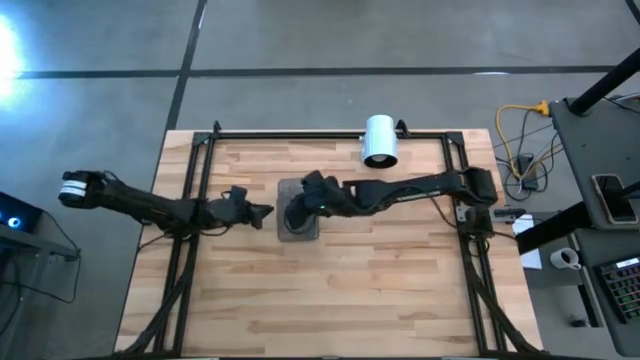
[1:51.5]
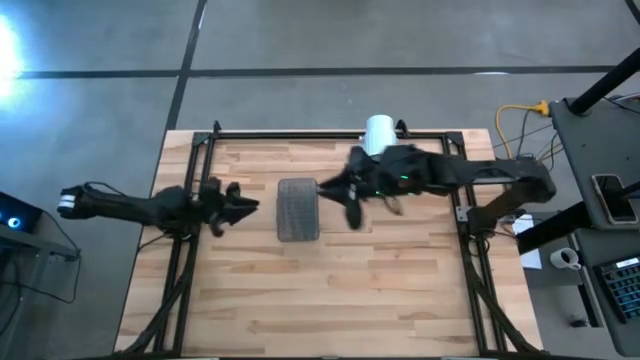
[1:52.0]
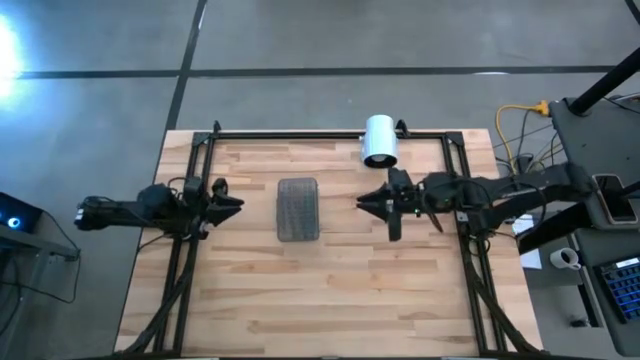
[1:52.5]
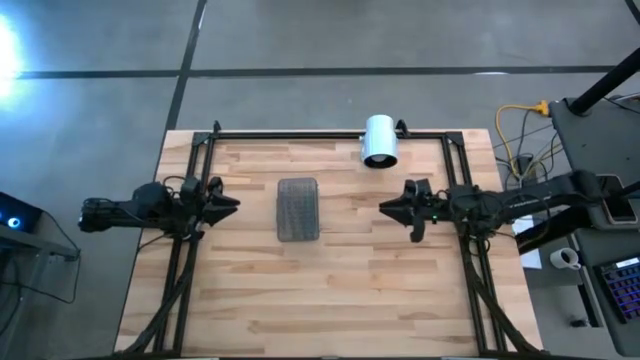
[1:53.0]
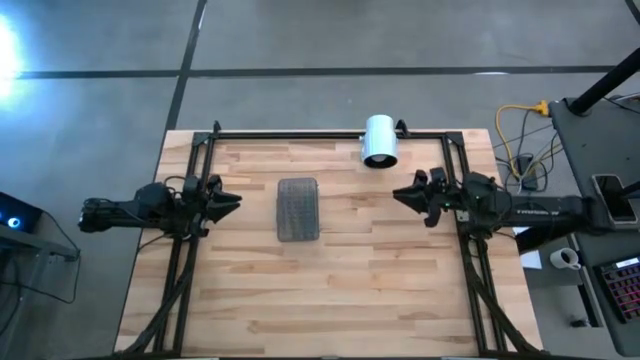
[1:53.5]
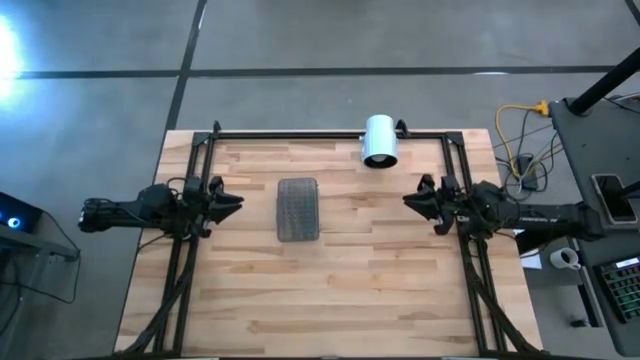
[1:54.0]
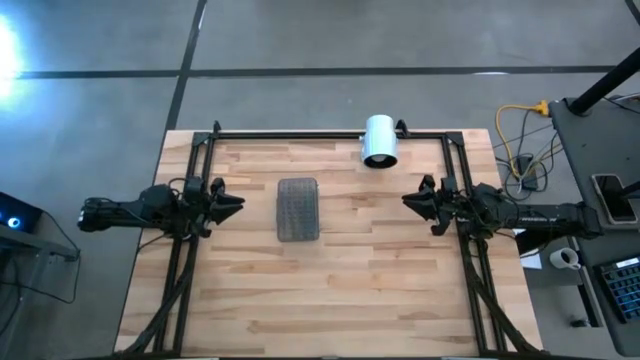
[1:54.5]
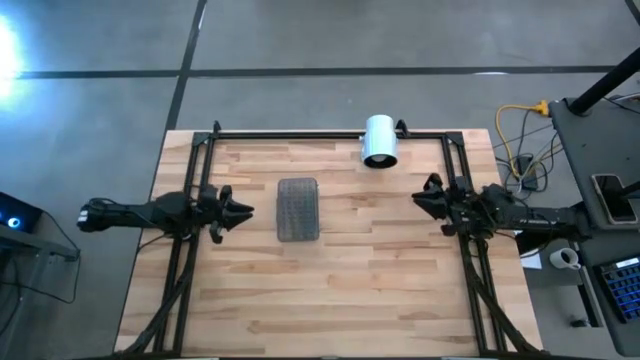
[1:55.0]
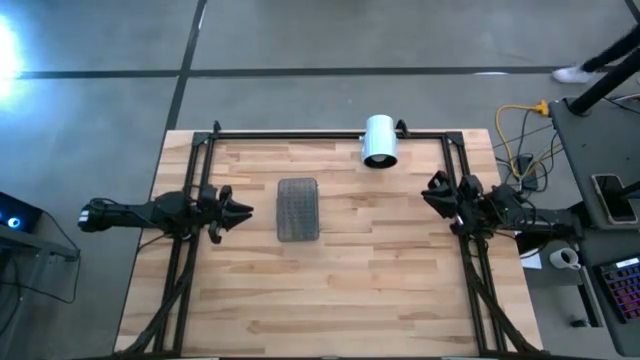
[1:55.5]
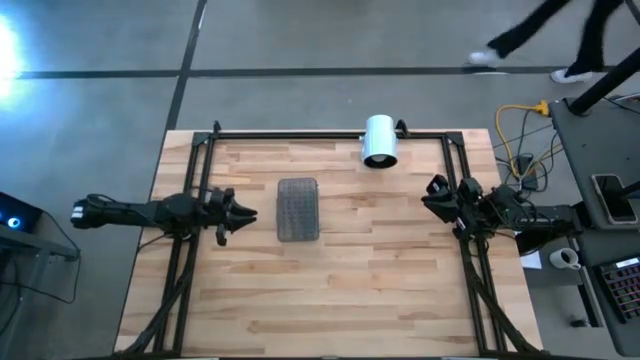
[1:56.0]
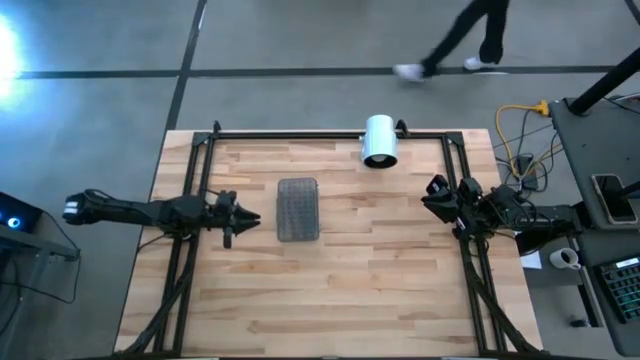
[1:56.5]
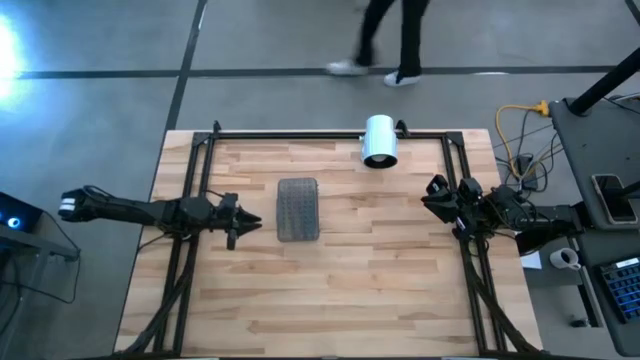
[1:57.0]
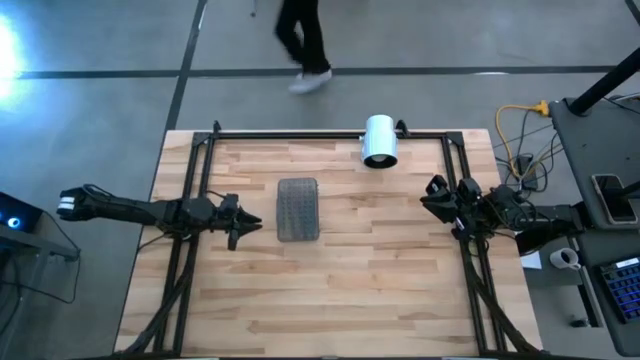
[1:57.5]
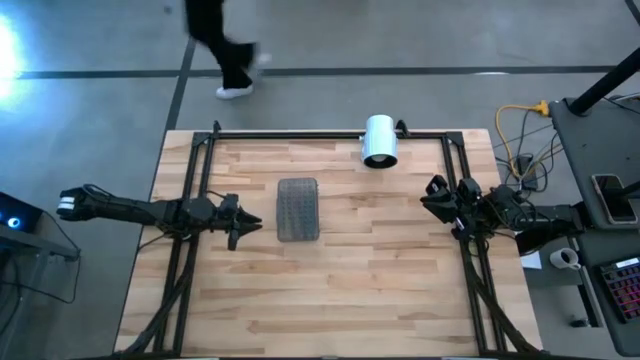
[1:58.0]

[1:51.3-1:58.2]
Task: Pick & place school supplies into a supply box
Return to Home Position

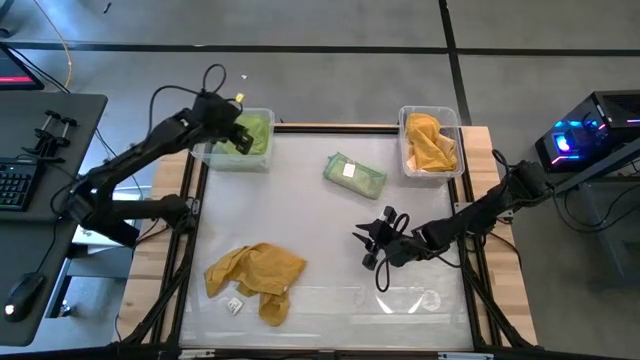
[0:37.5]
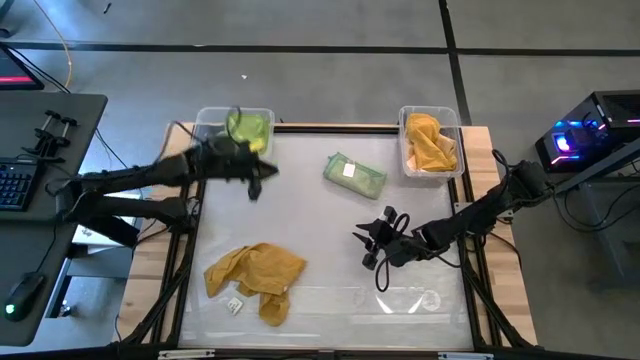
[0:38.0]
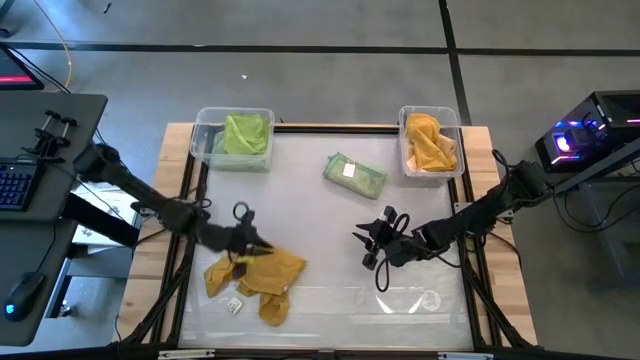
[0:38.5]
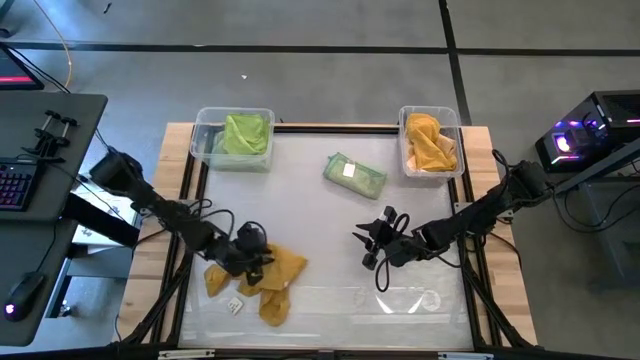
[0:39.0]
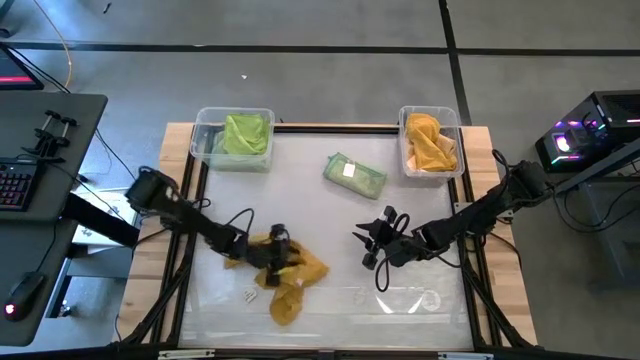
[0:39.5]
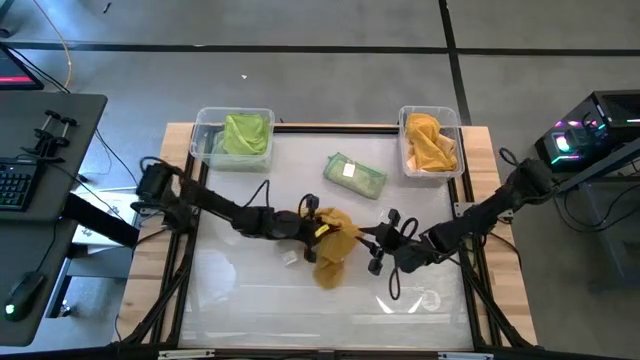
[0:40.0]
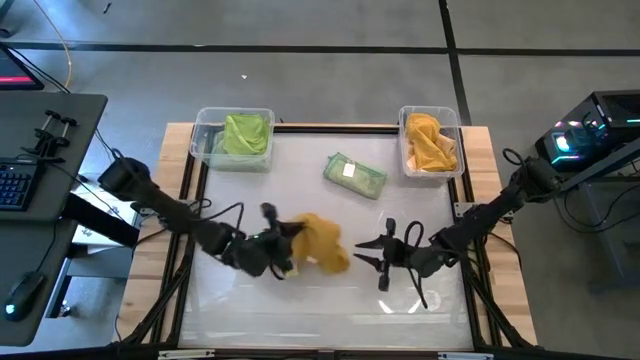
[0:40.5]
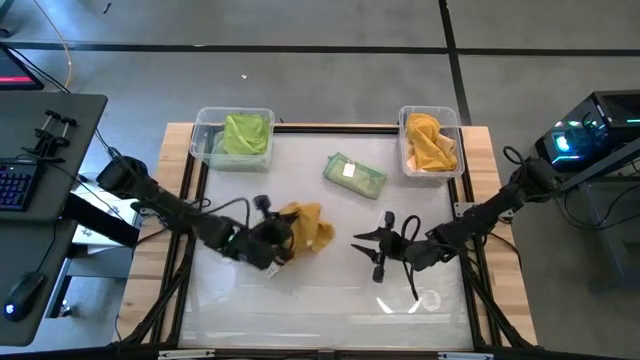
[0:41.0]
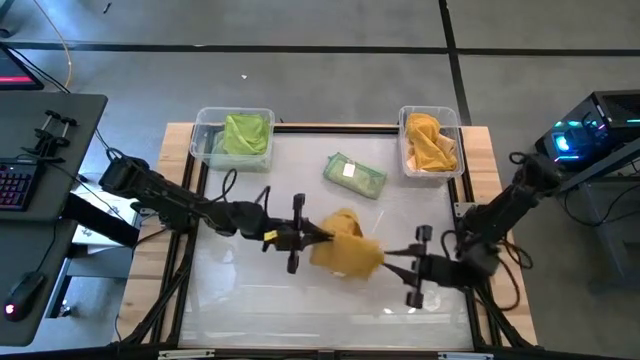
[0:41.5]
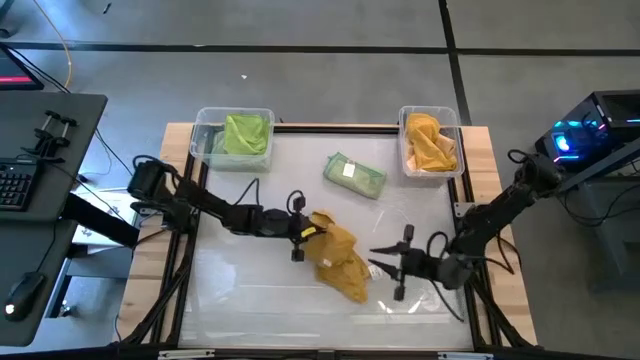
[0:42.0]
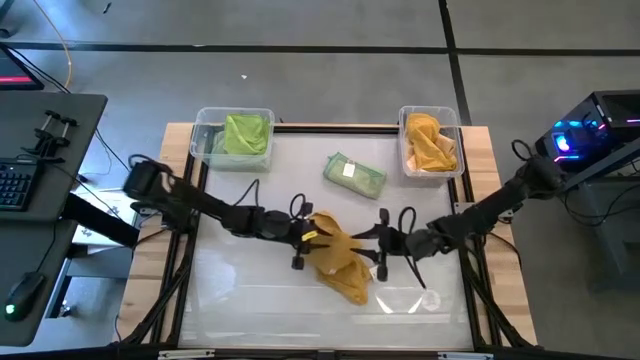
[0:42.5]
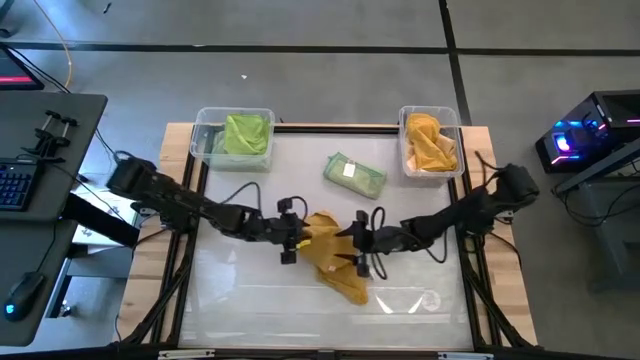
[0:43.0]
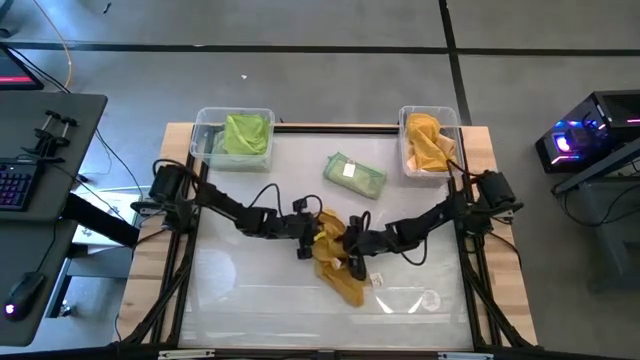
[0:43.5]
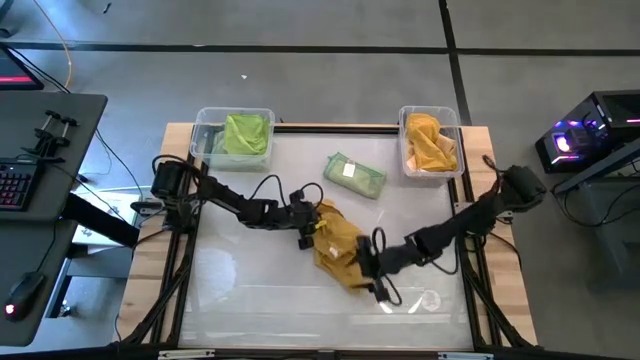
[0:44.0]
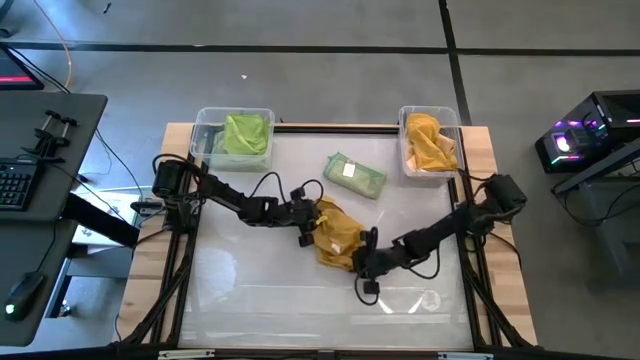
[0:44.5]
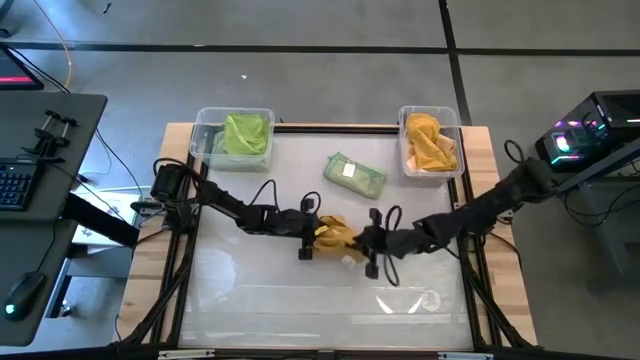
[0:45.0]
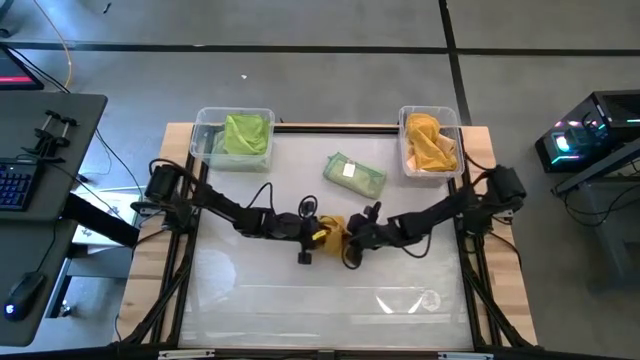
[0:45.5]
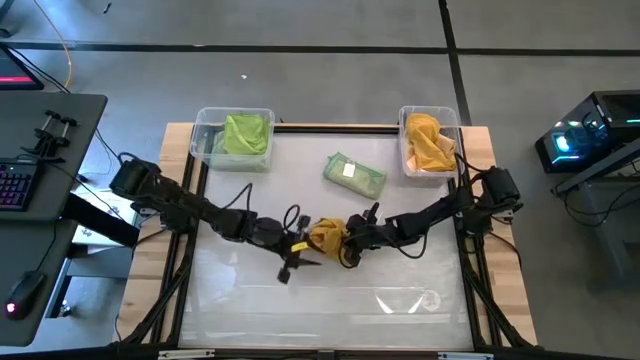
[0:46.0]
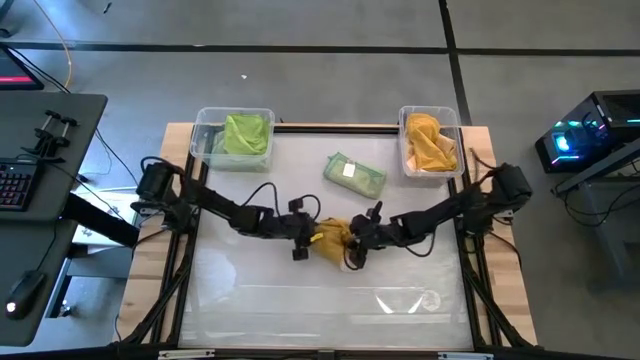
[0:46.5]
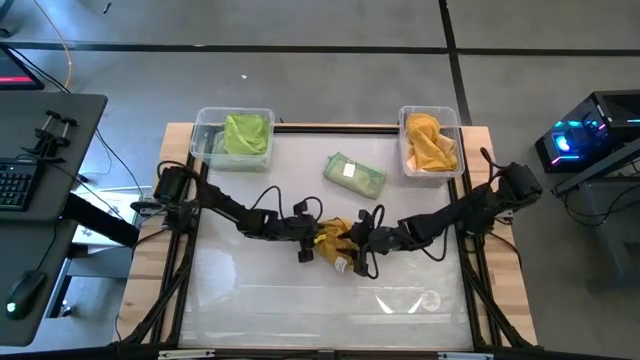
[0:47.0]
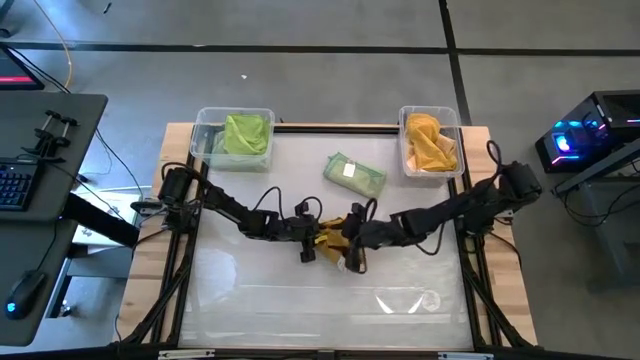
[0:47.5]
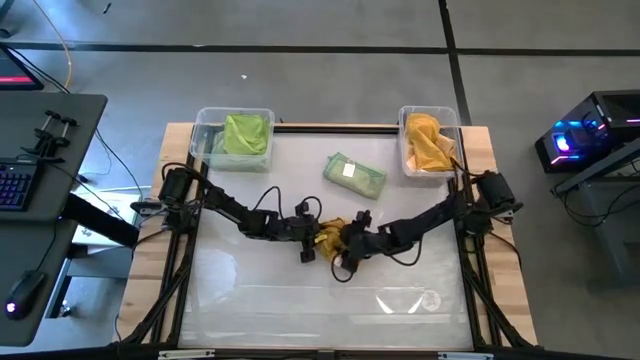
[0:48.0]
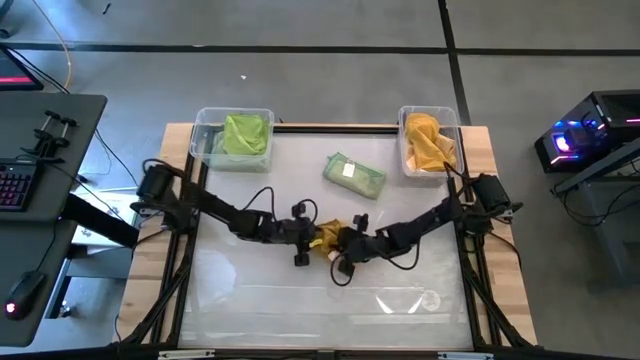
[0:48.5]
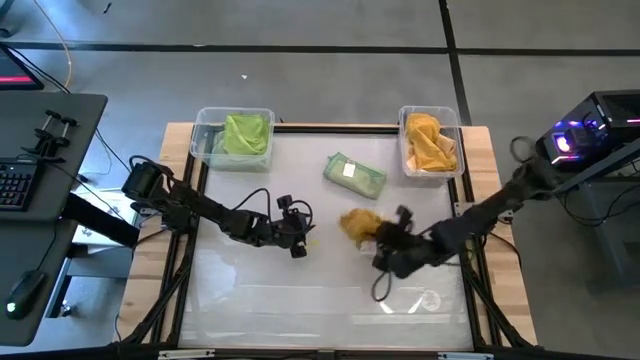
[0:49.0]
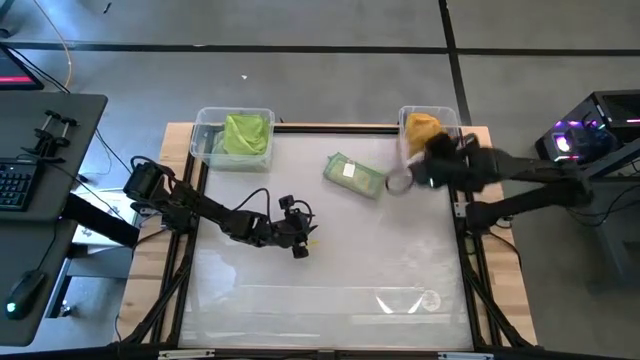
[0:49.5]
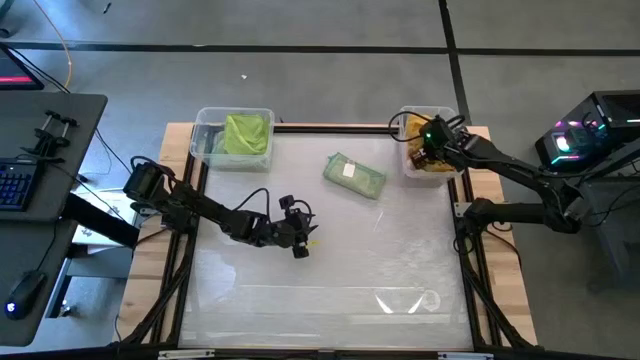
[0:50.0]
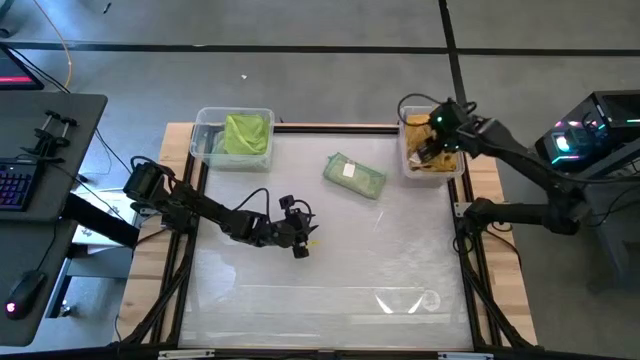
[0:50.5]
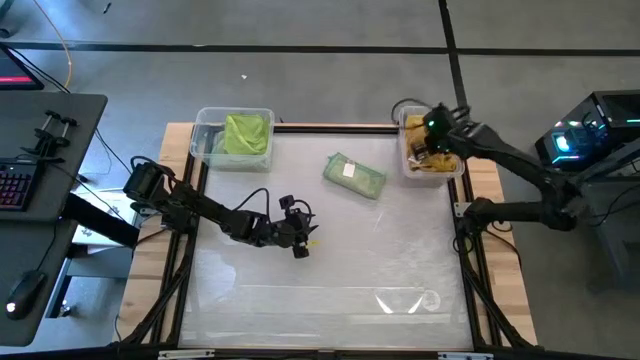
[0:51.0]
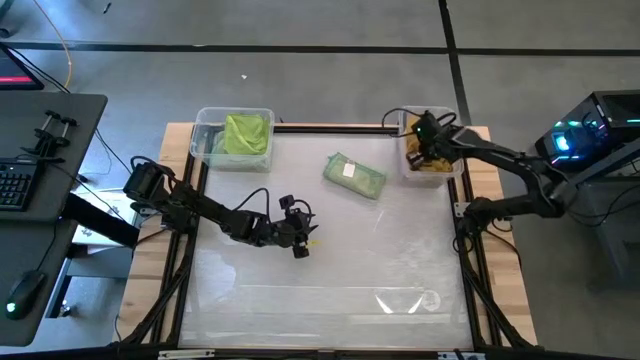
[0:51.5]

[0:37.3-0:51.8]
Task: Sort towels by color in basket
Put the yellow kitchen towel into the right transparent bin
